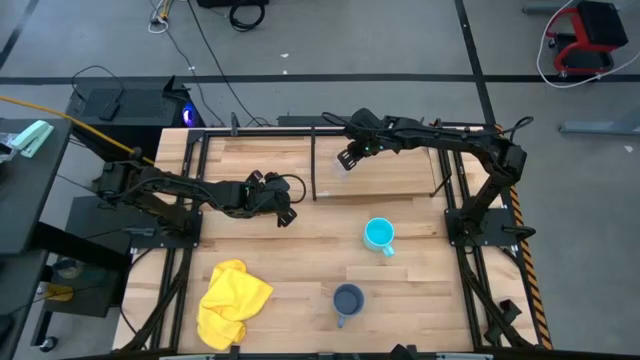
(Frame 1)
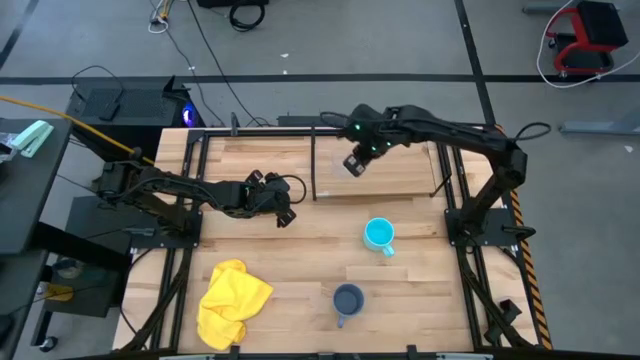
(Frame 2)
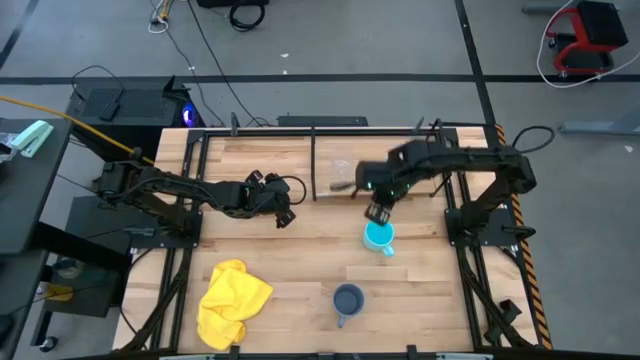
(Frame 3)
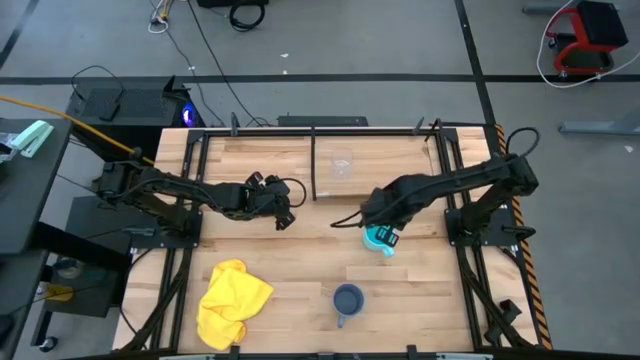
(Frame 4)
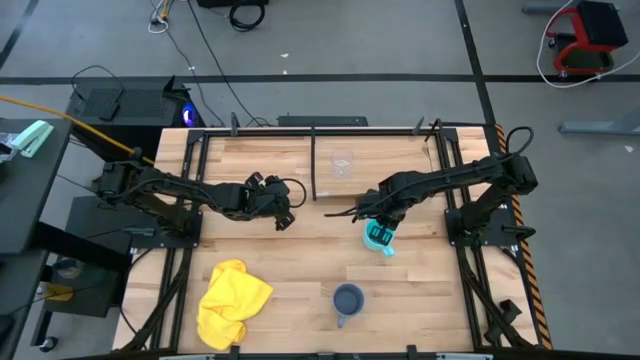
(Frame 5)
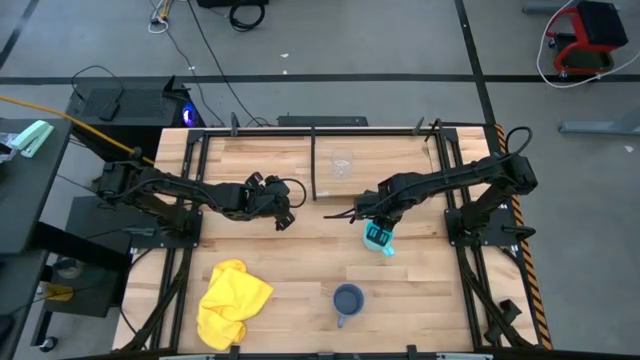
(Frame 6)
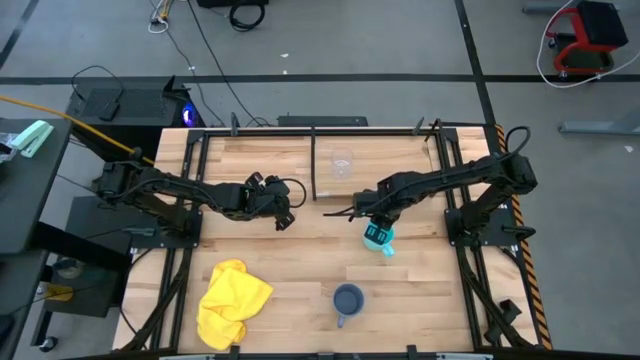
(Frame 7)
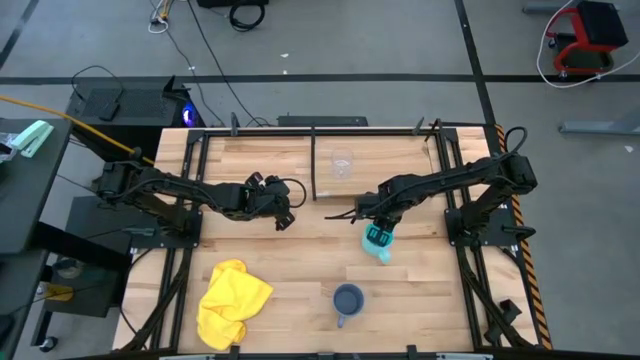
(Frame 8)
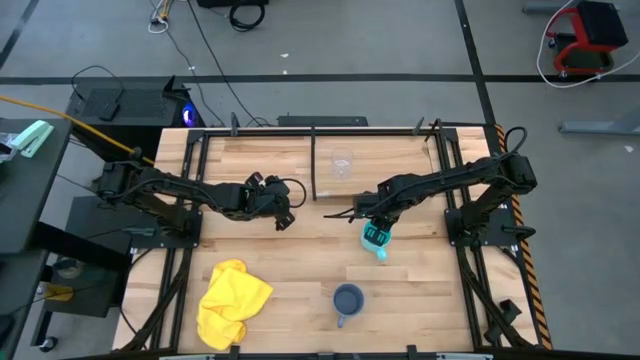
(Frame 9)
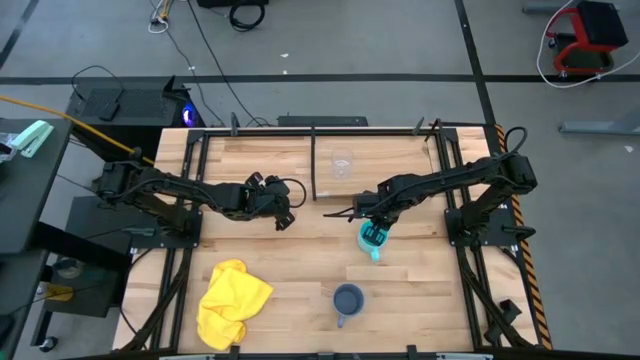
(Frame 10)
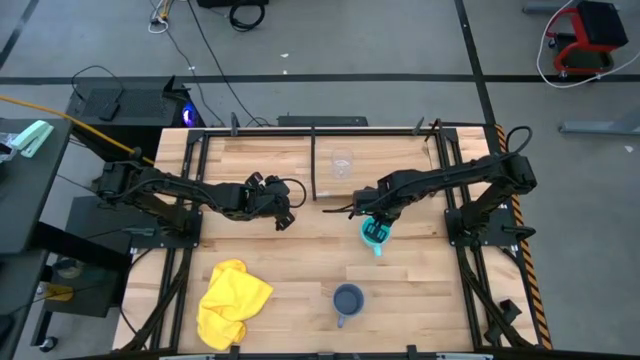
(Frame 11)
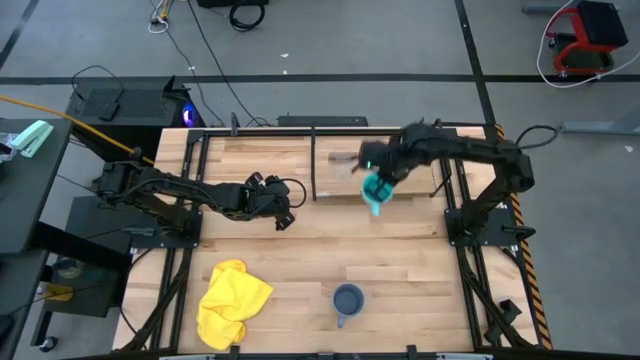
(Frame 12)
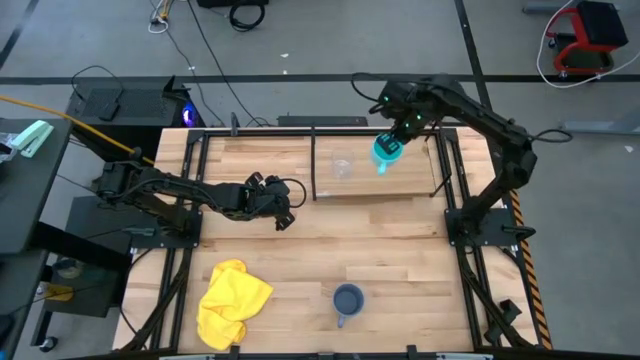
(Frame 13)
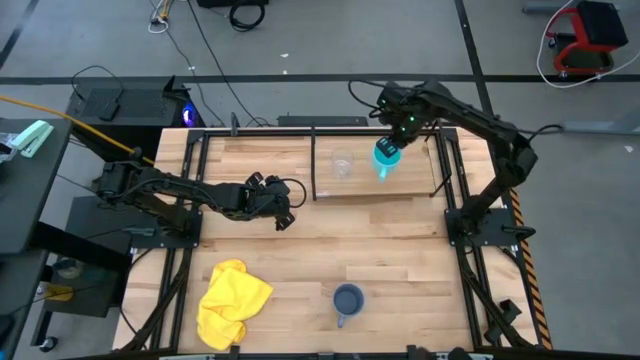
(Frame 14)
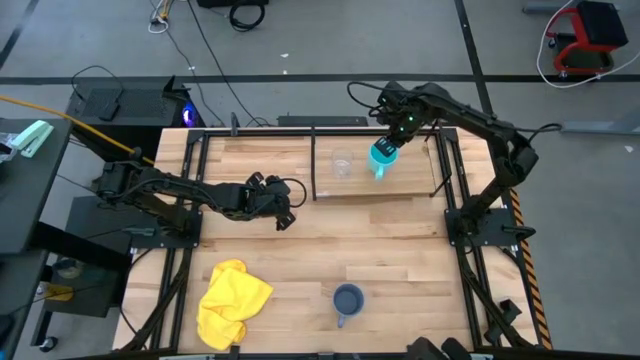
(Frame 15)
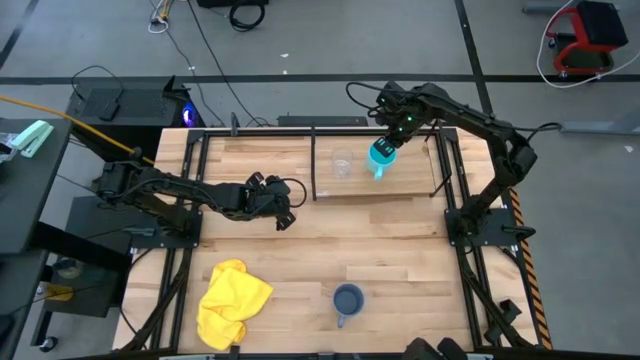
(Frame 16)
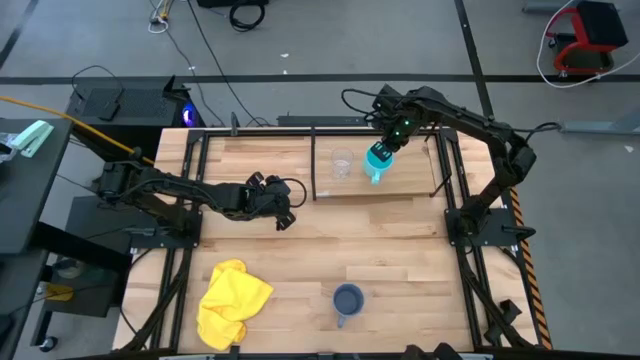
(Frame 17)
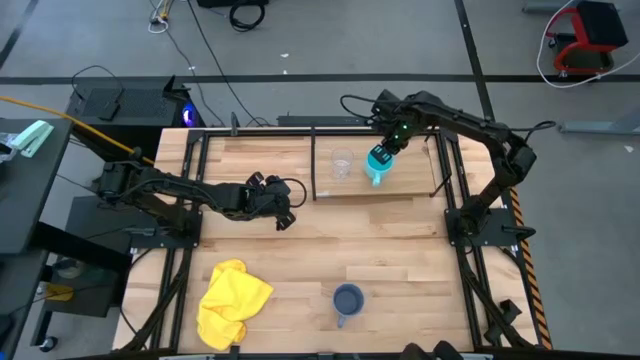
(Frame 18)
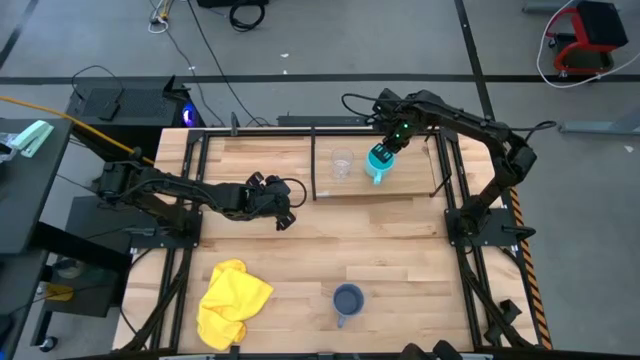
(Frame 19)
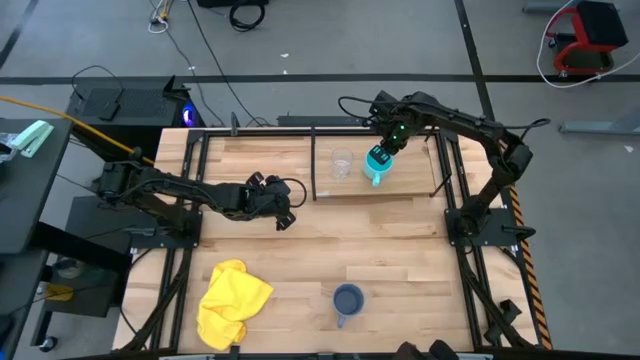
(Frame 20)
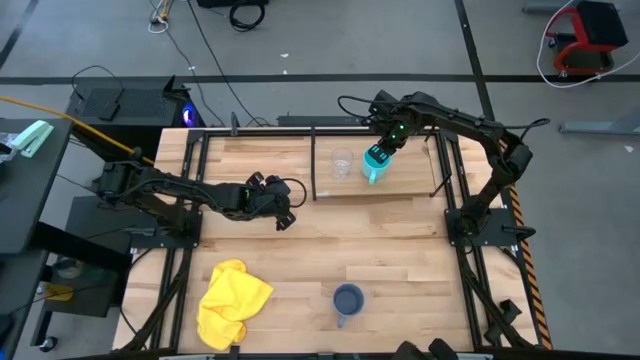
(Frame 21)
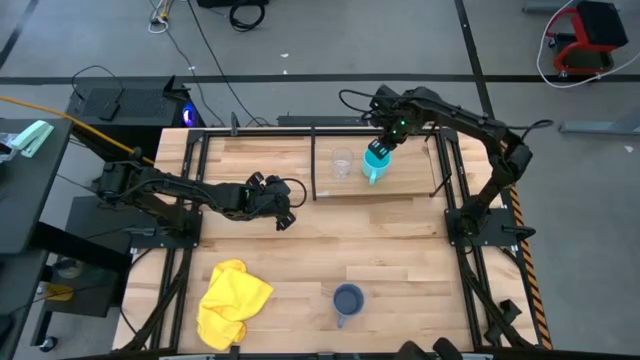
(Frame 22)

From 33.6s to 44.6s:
Task: Stack small to large cups/mugs on shelf
Put the light blue mug on the shelf

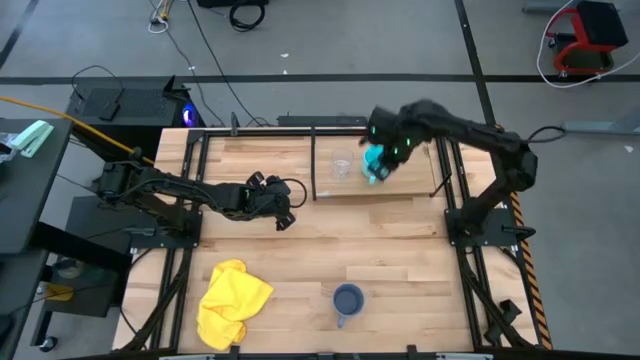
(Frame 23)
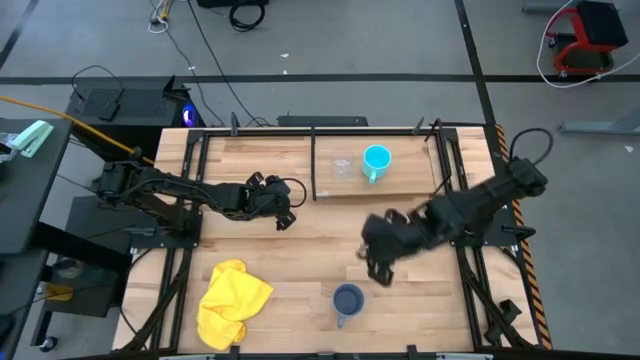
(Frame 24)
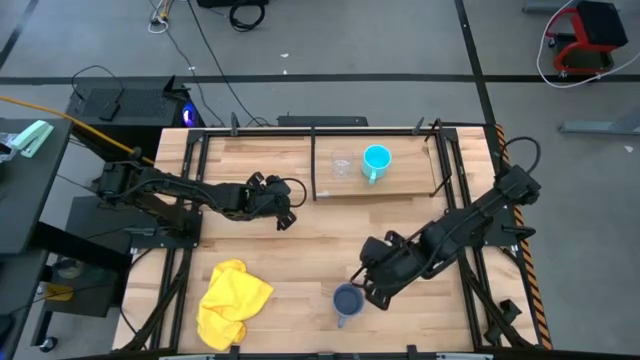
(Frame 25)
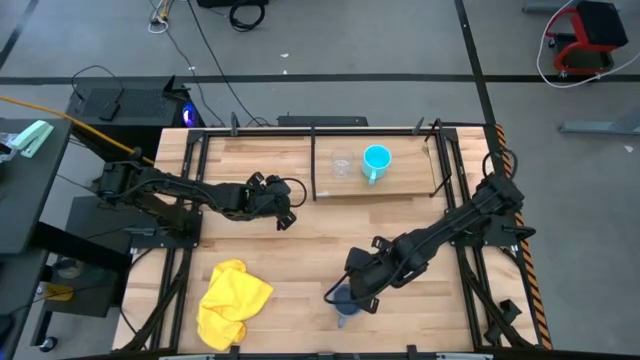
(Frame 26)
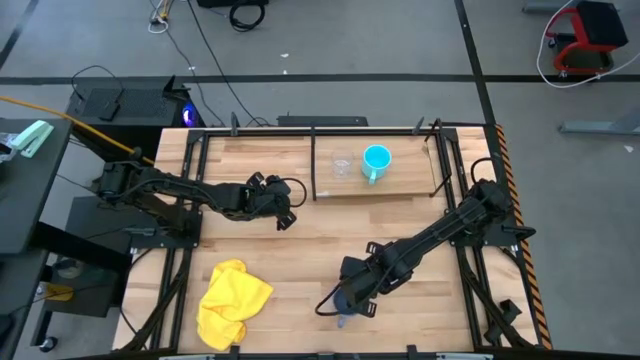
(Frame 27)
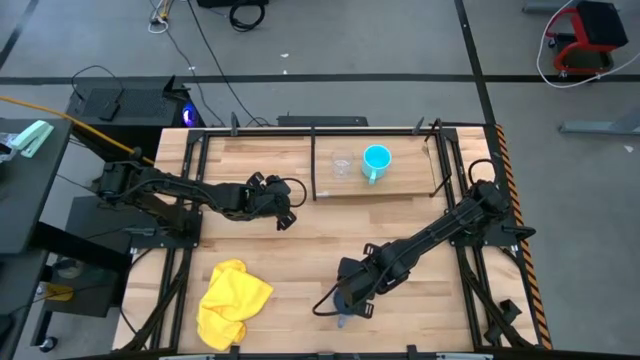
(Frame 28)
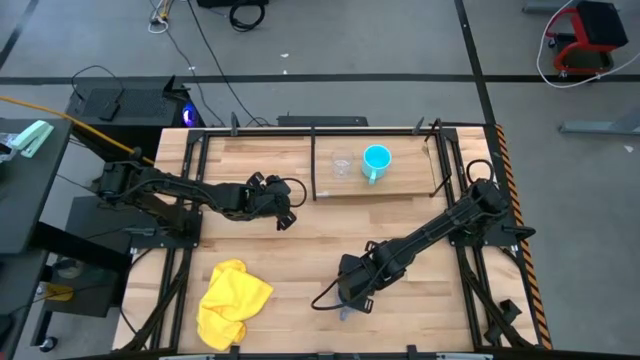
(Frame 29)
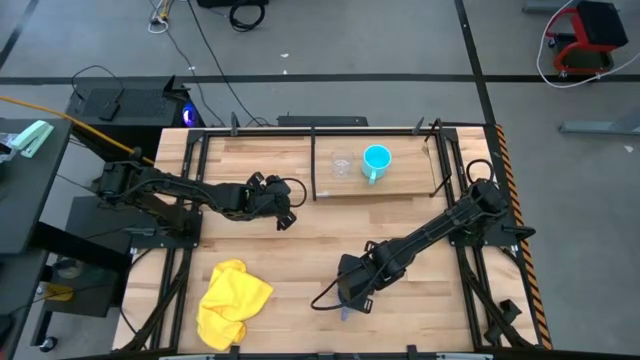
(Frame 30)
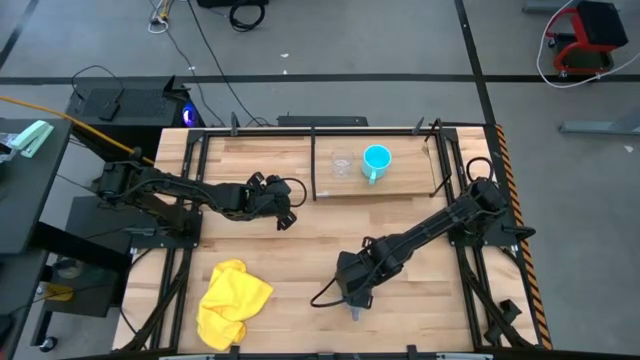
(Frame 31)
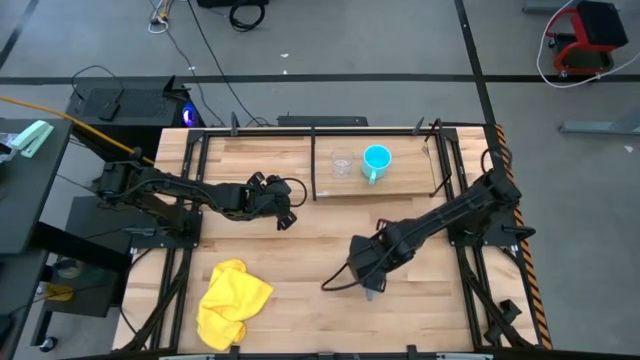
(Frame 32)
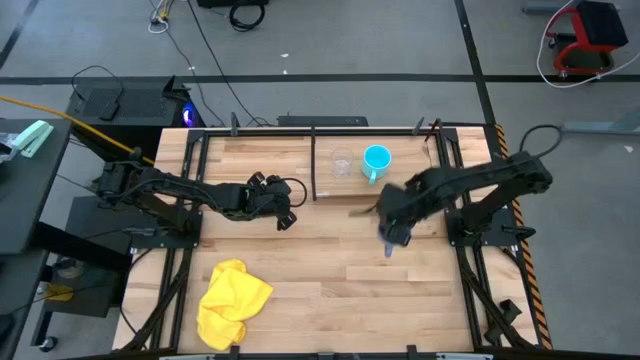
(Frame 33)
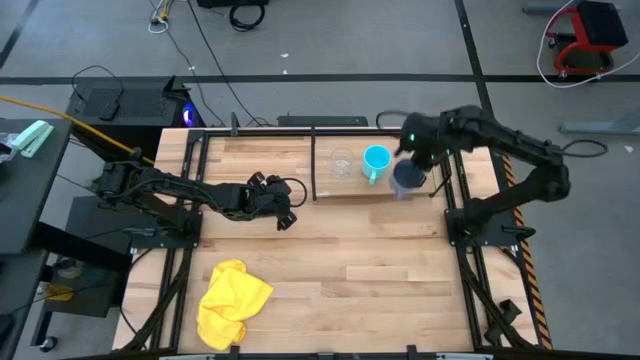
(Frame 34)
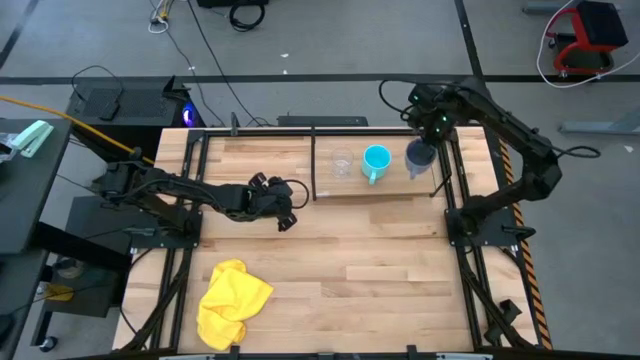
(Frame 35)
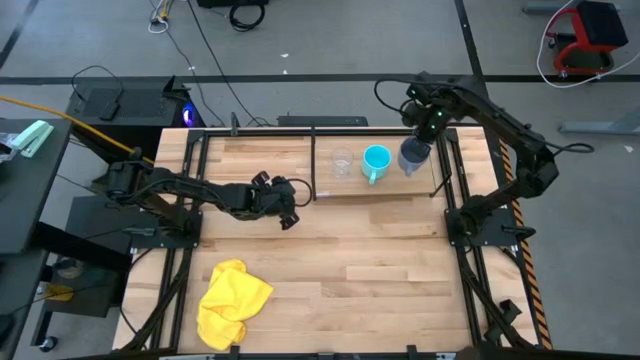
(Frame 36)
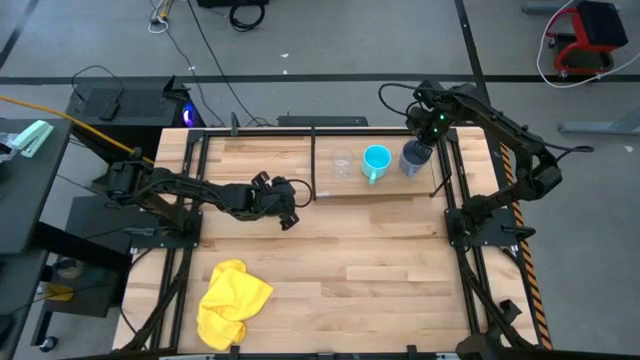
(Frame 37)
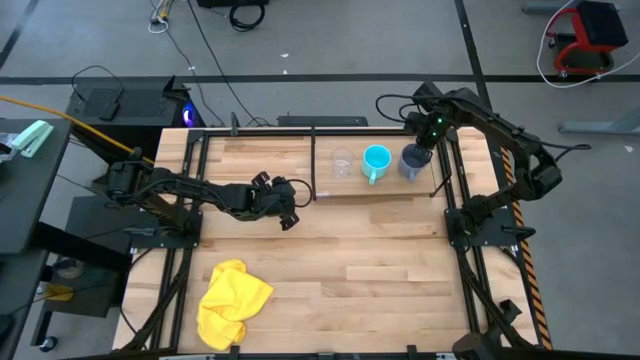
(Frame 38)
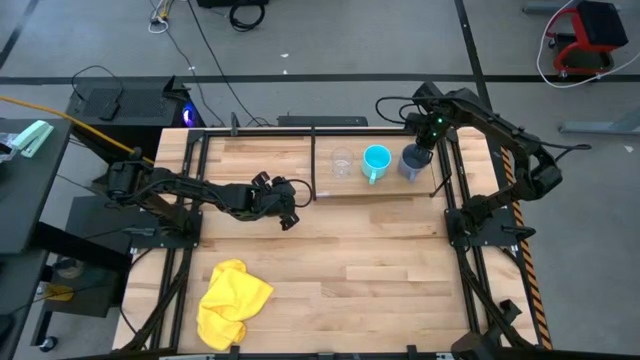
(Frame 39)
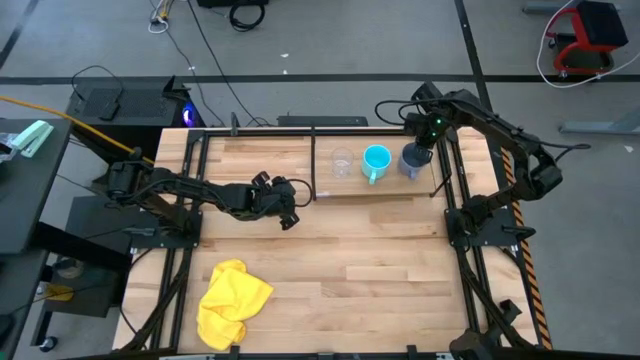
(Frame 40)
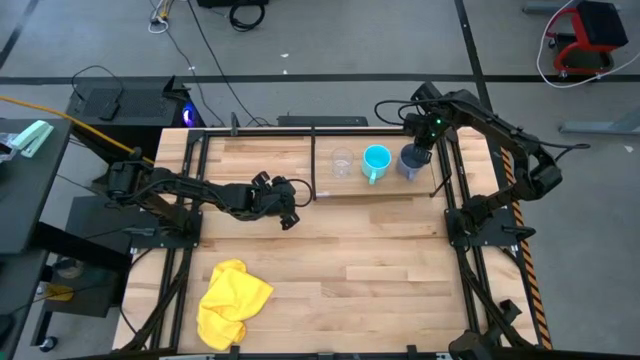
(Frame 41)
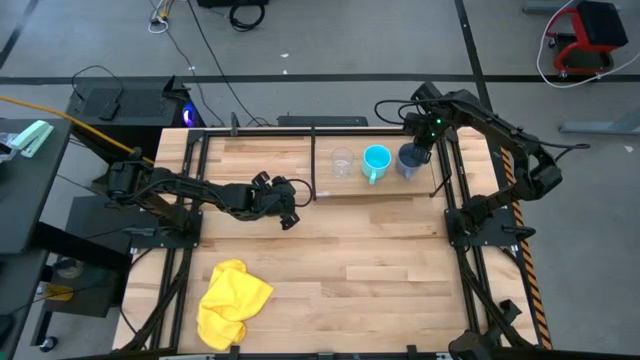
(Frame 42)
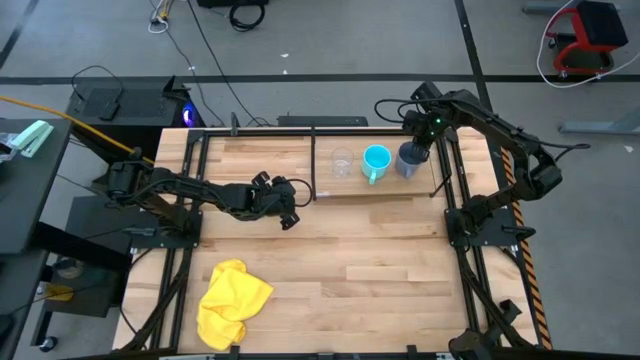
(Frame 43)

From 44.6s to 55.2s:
Put the blue mug on the shelf

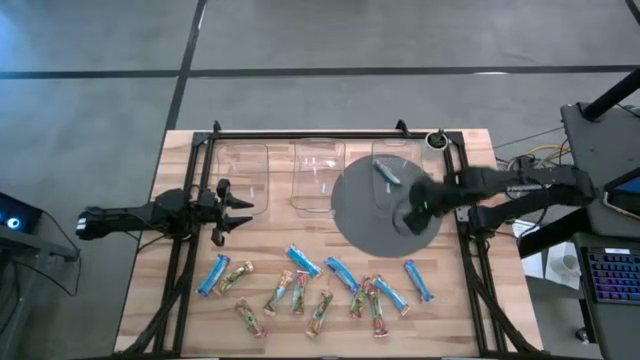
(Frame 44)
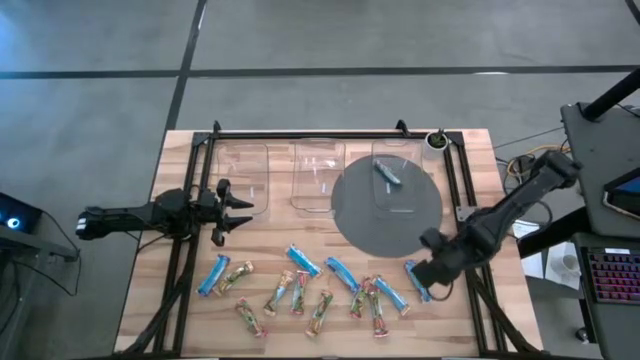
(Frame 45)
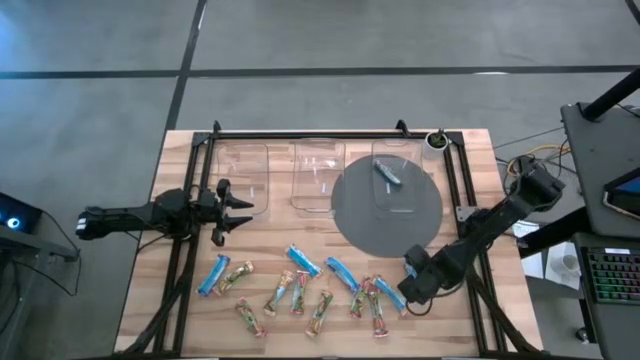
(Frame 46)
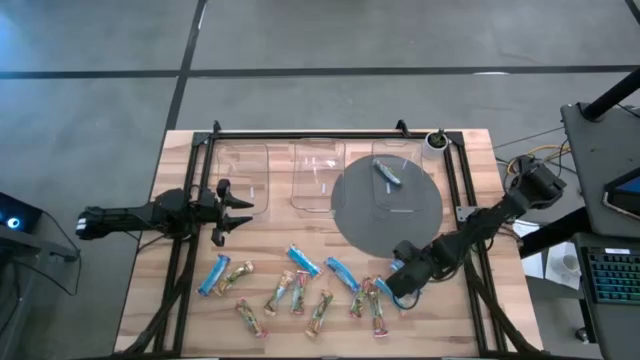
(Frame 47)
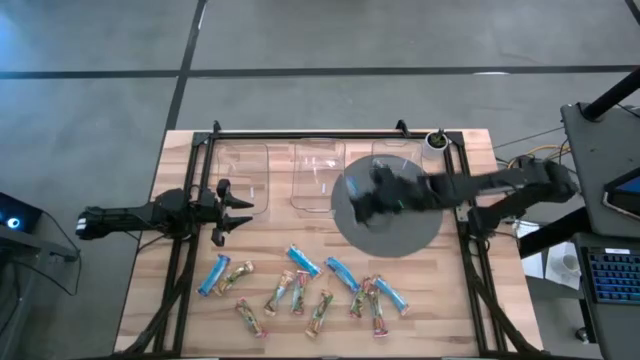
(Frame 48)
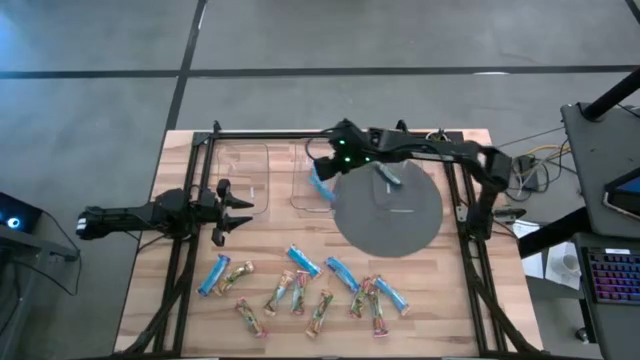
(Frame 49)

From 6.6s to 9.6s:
Task: Pick and place Granola Bars by type
Put the blue granola bar into the middle transparent container
